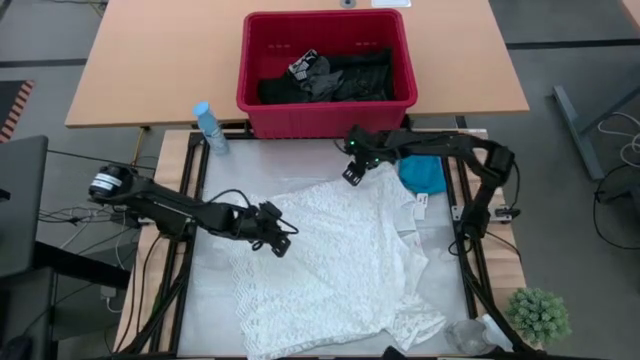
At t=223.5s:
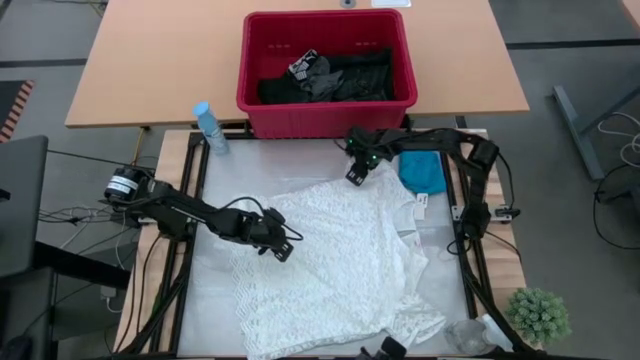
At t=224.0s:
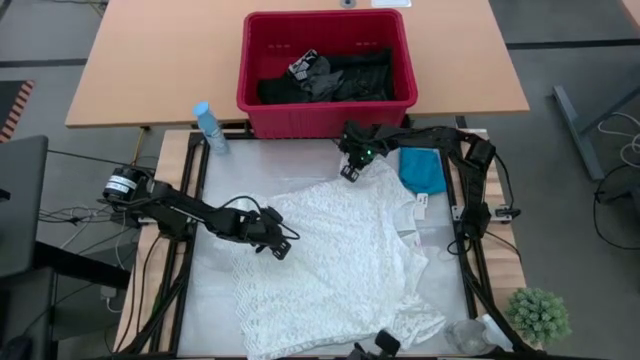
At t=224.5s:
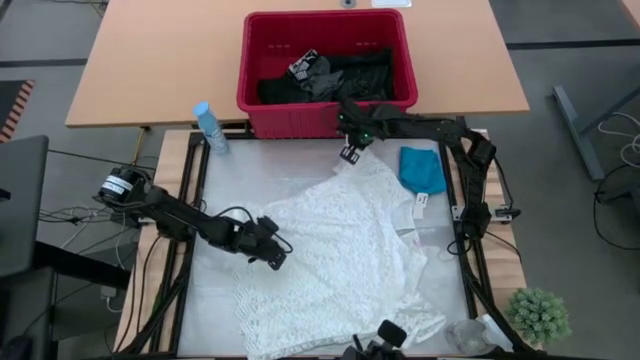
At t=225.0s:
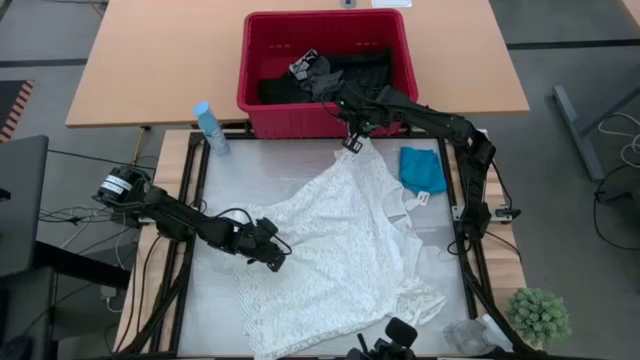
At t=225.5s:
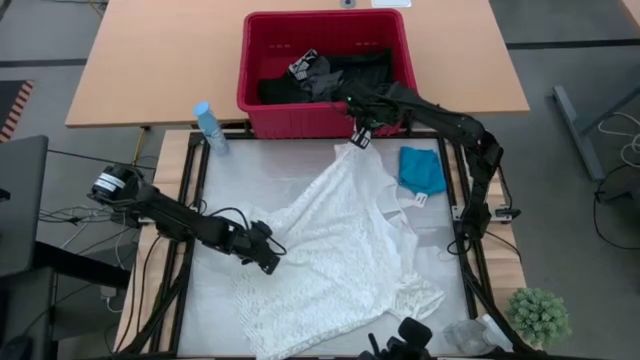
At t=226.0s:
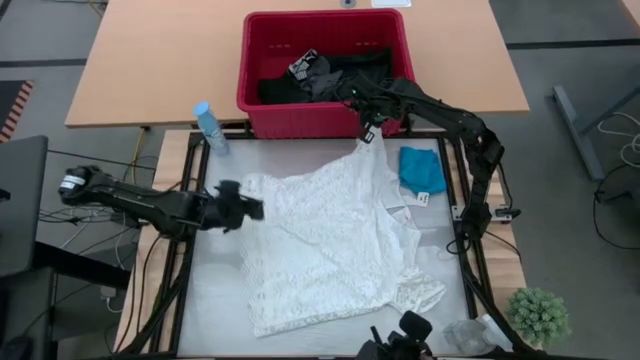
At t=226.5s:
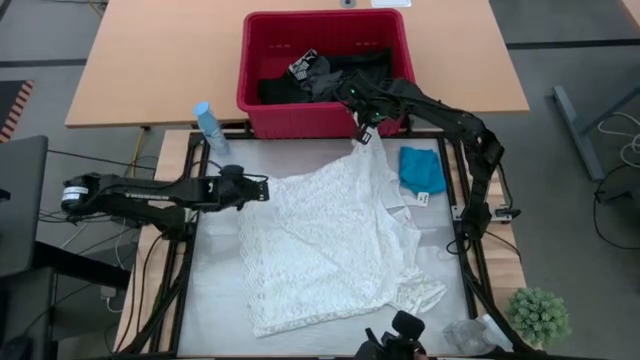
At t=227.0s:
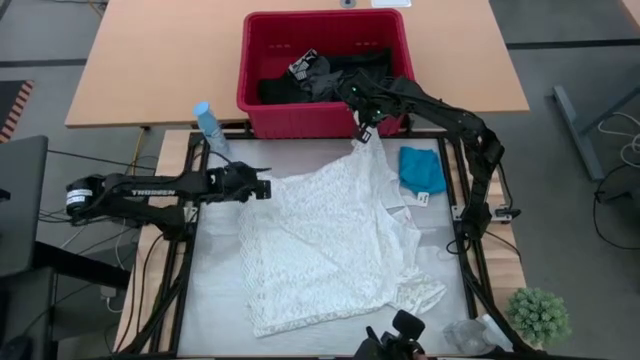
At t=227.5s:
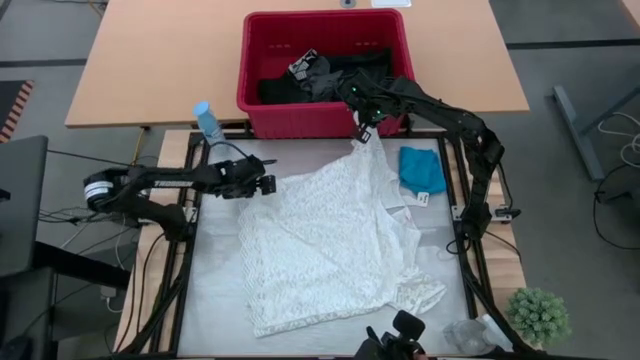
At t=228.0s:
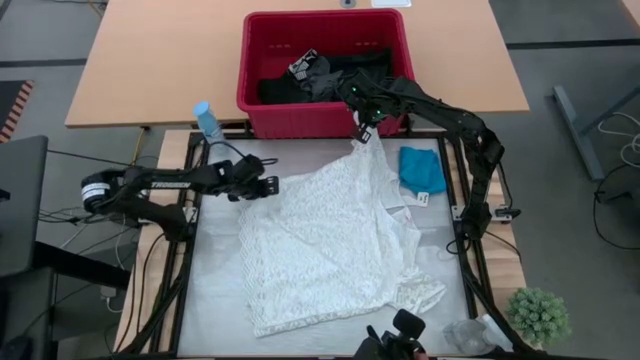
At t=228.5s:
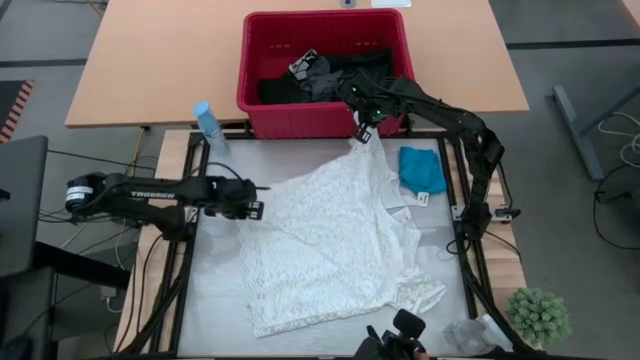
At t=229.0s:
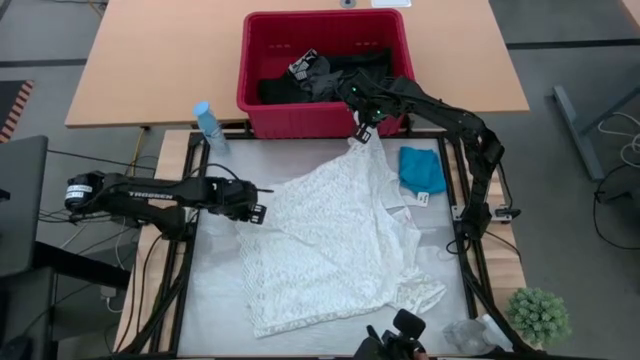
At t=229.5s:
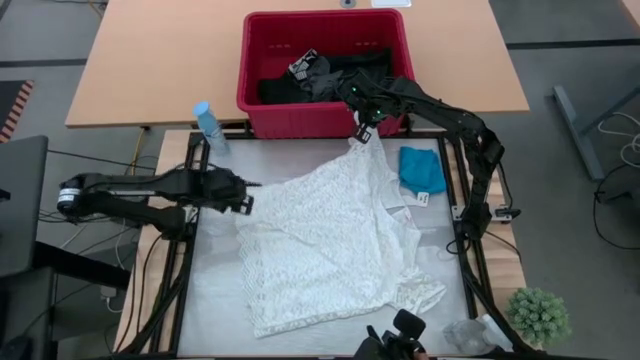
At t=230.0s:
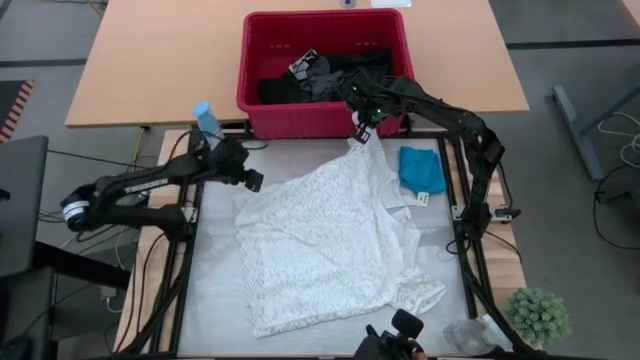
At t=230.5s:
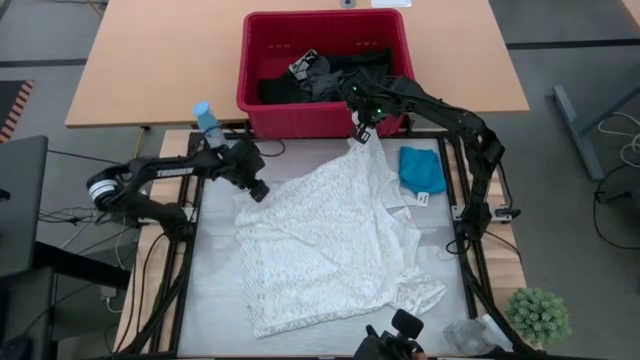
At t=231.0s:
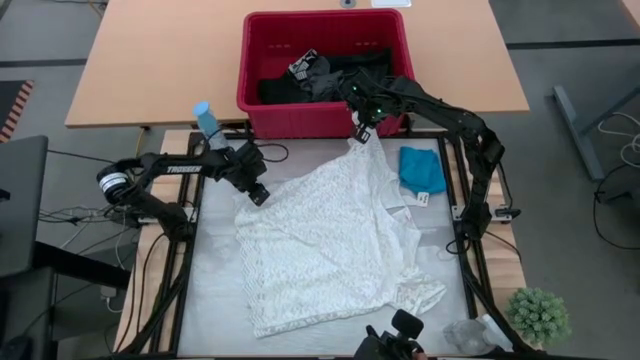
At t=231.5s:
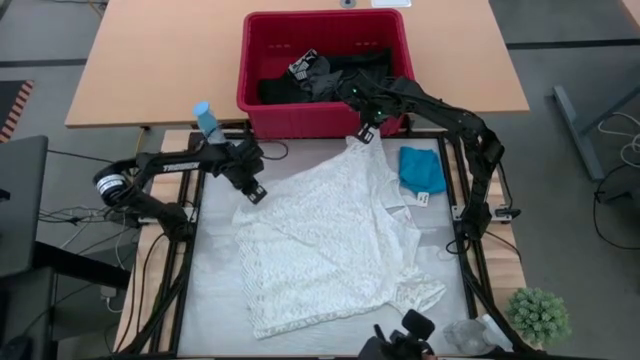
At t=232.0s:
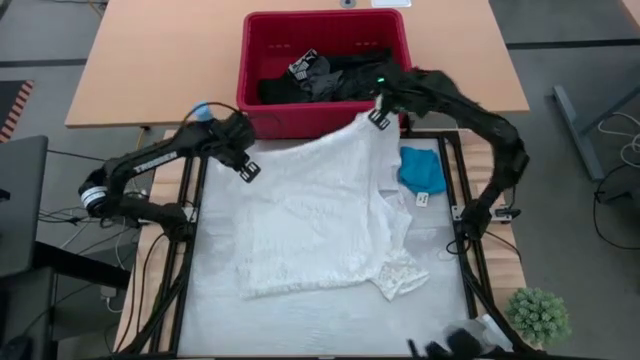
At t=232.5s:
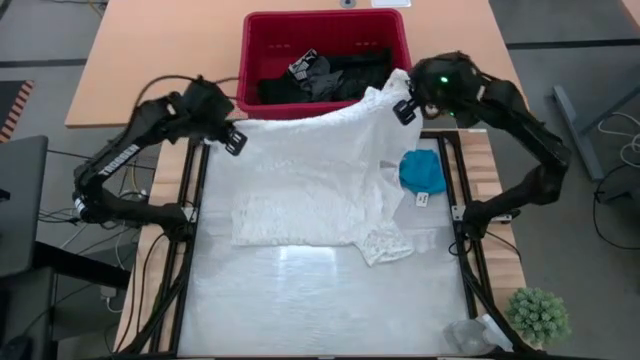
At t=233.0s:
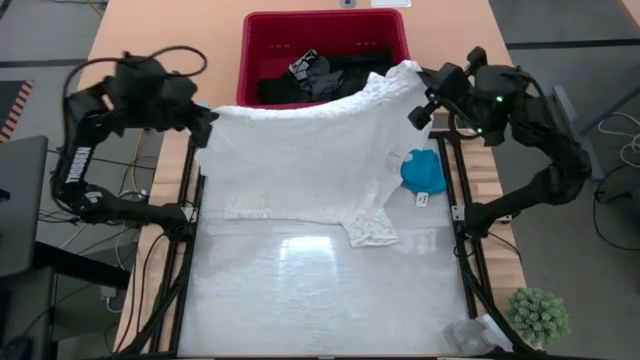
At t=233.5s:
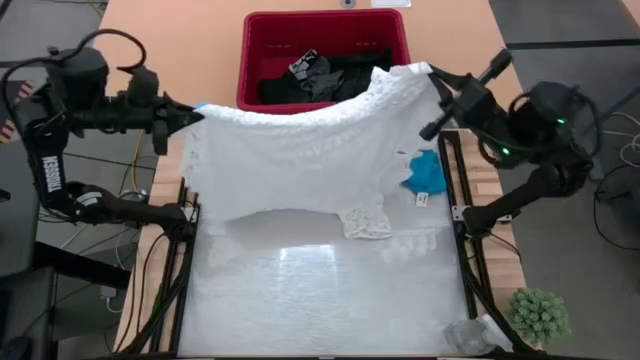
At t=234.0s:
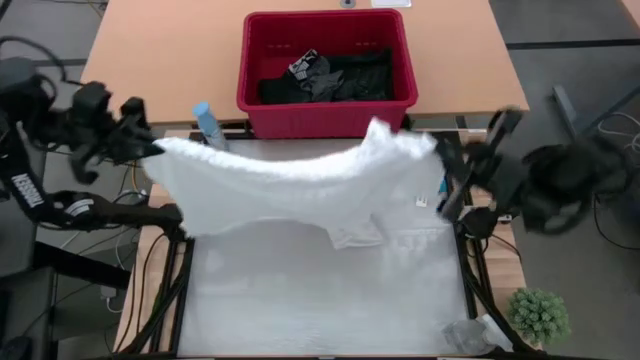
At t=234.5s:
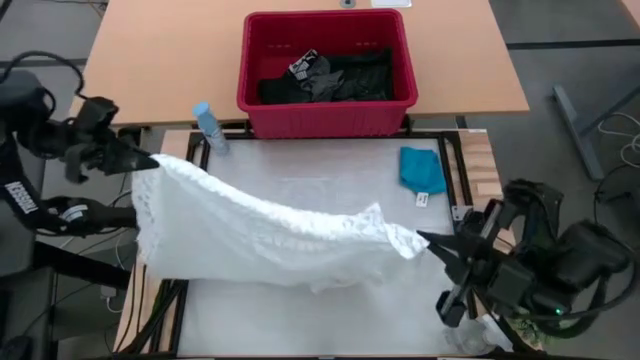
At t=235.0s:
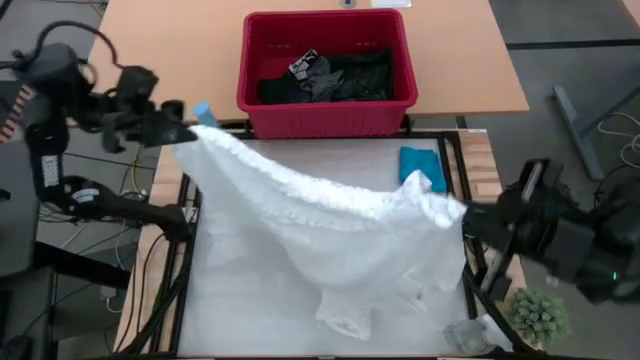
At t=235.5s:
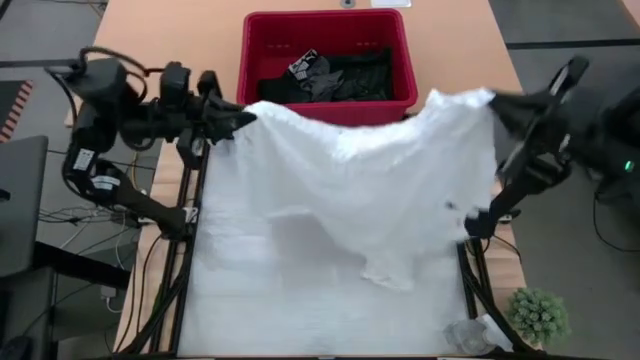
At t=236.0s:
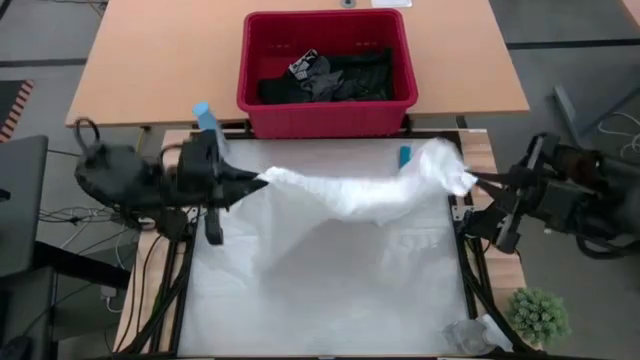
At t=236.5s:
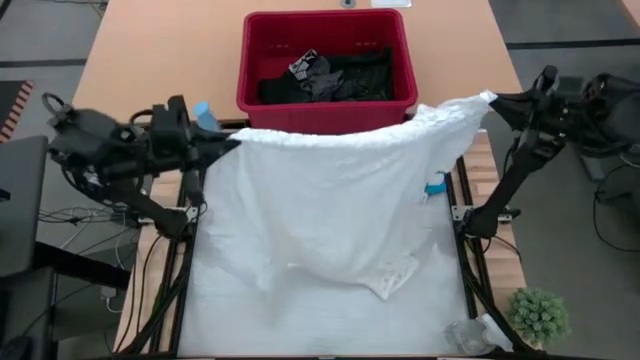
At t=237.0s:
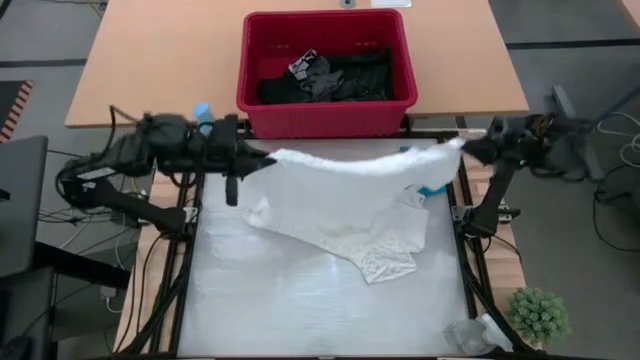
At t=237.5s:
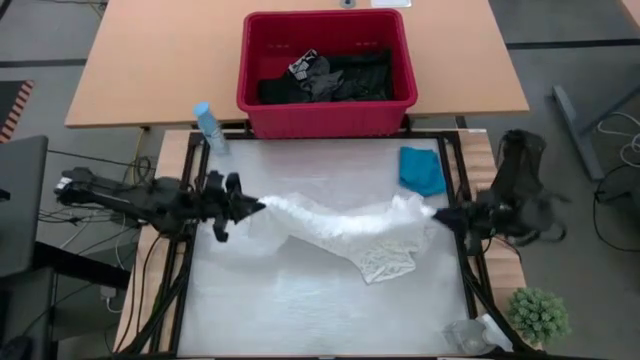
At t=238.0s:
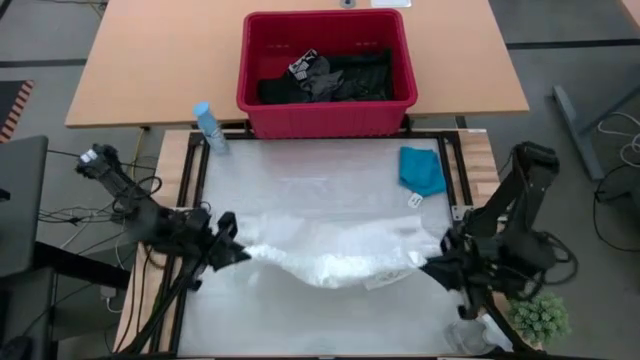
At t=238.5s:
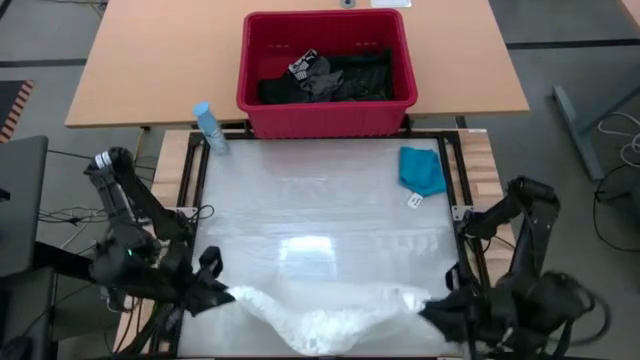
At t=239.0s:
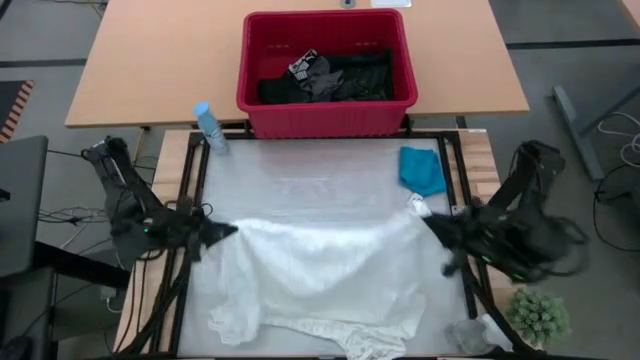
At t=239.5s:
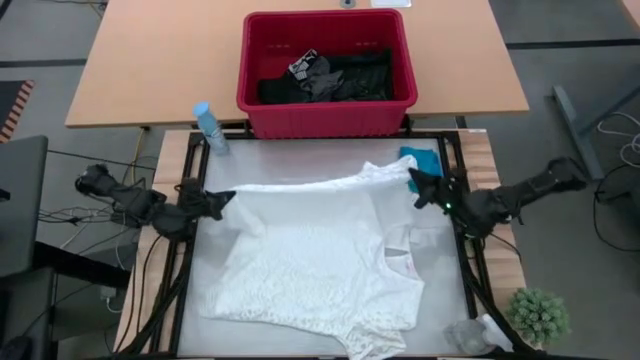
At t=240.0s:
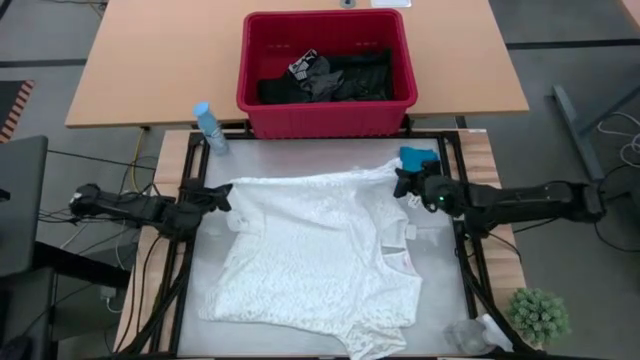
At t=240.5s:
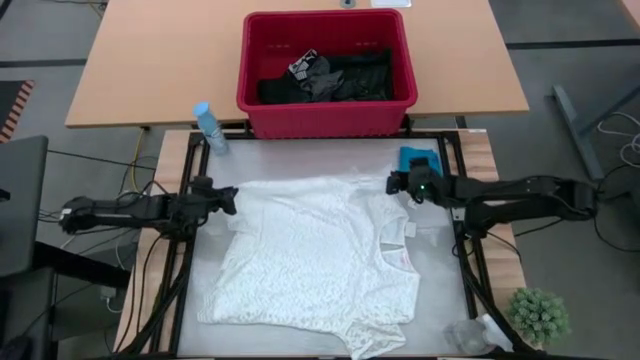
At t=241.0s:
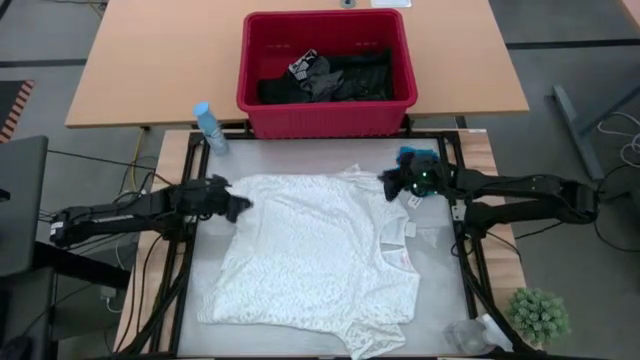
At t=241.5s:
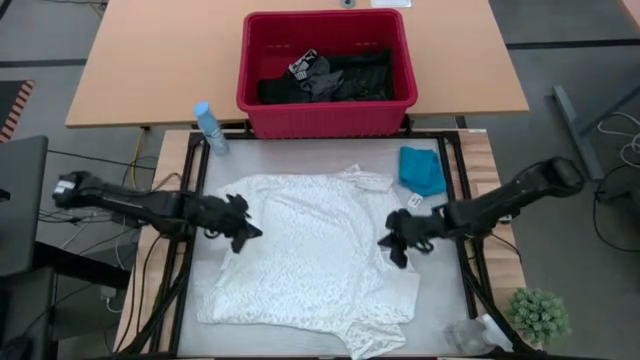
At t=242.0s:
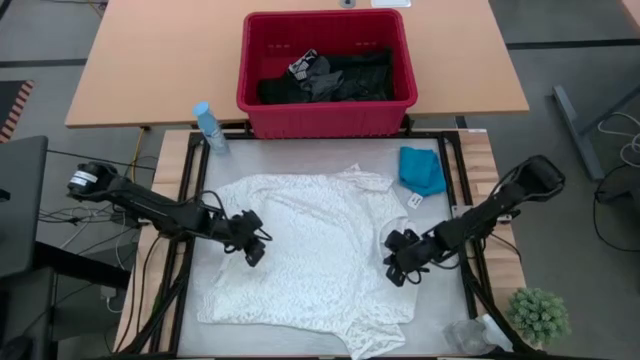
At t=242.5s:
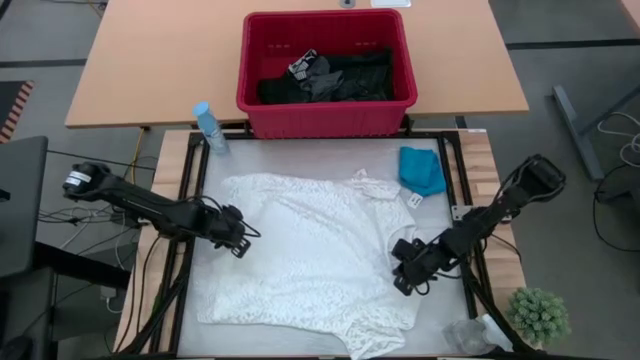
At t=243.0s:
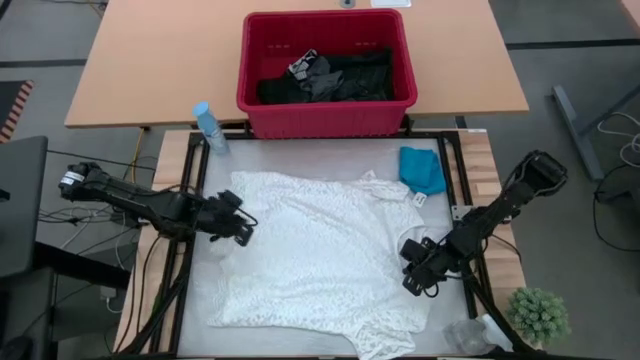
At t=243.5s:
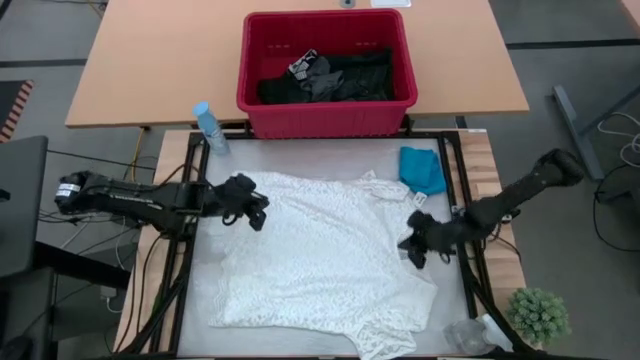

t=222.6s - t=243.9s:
Task: Fold laundry
Fold the white shirt

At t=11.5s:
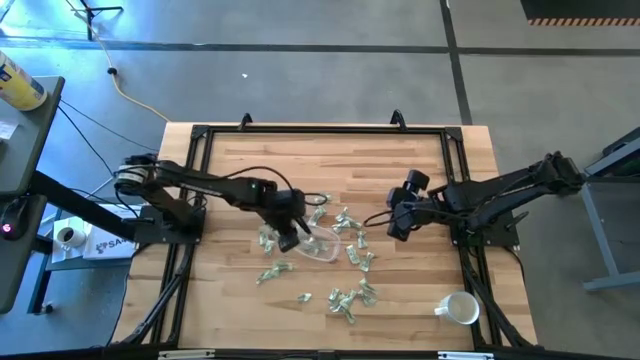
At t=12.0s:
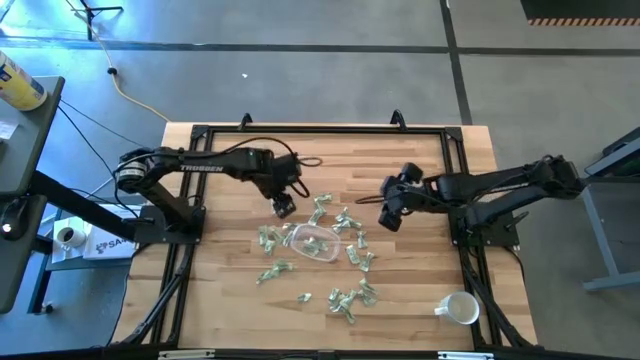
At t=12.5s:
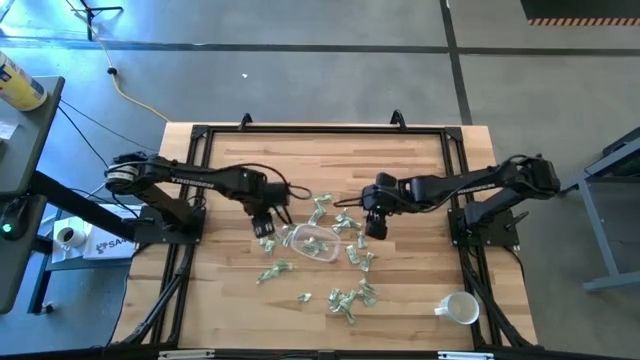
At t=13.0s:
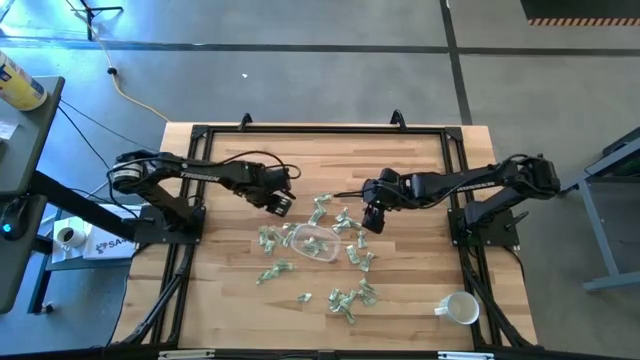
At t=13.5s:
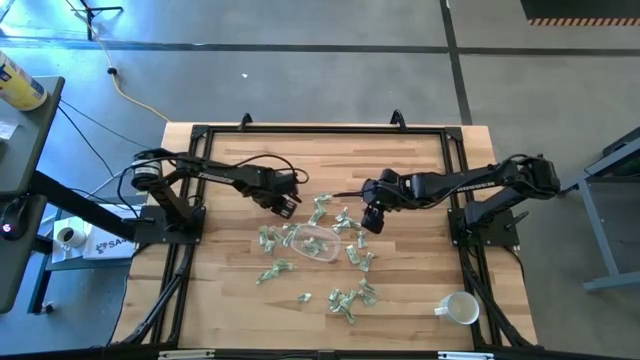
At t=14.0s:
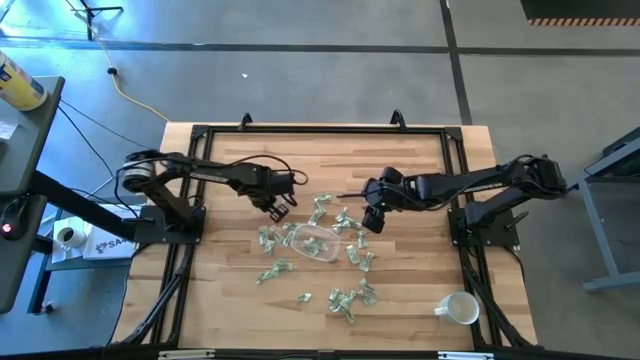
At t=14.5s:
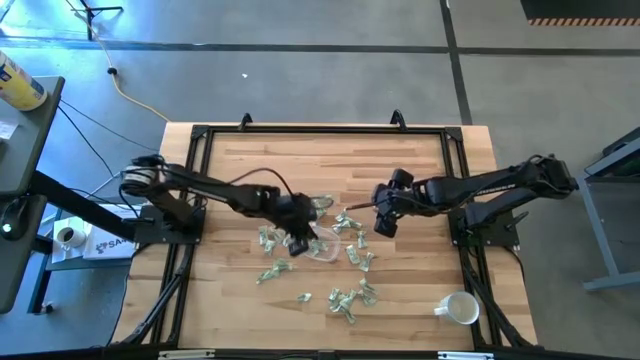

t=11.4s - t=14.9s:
Task: Pick and place Stevia / Truvia into bins
Put the green stevia packet into the transparent bin
